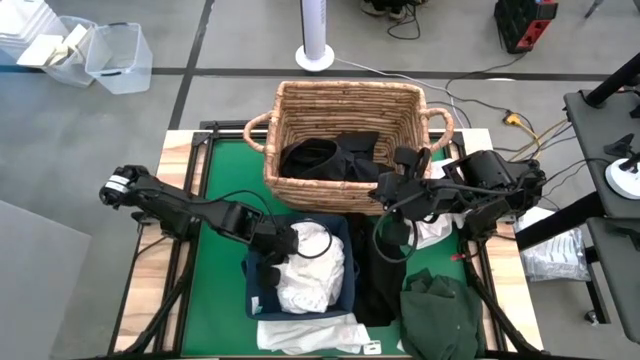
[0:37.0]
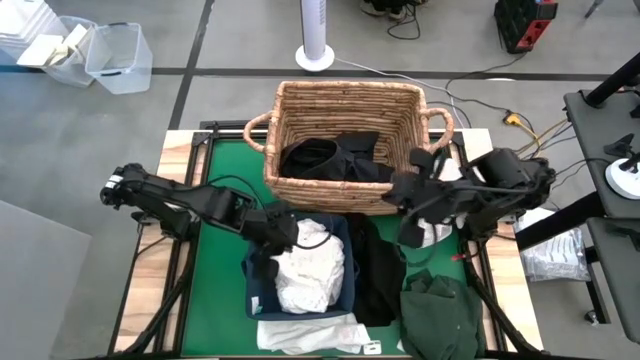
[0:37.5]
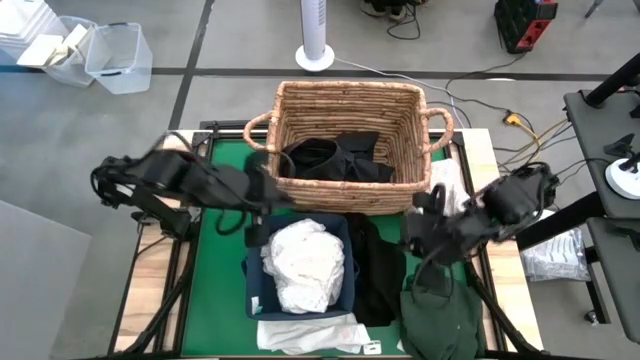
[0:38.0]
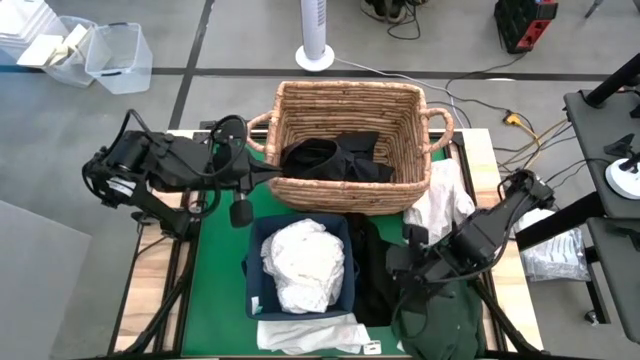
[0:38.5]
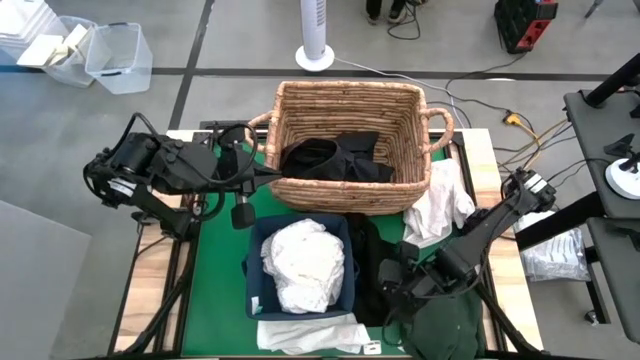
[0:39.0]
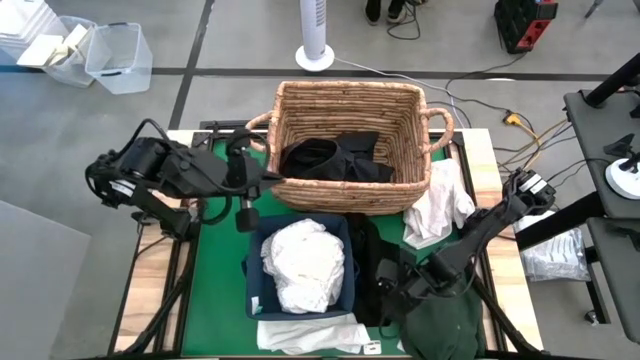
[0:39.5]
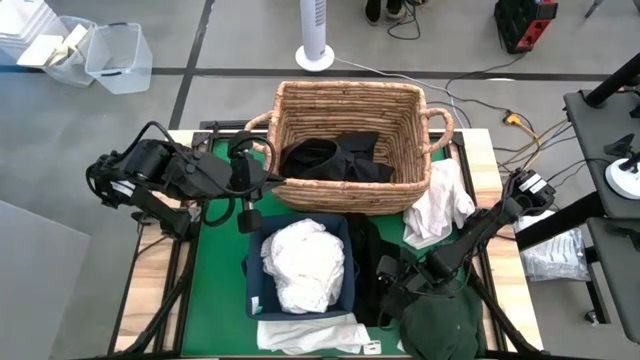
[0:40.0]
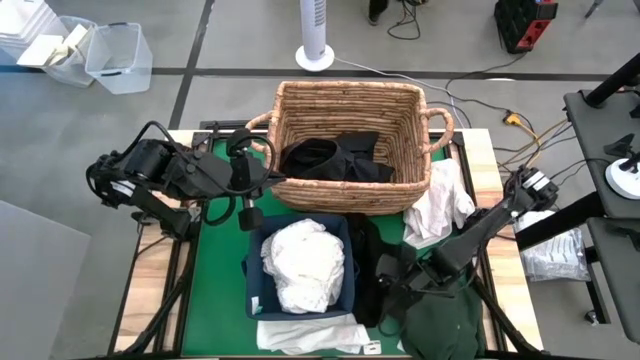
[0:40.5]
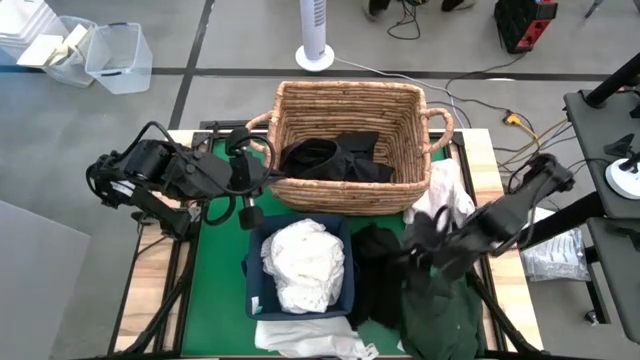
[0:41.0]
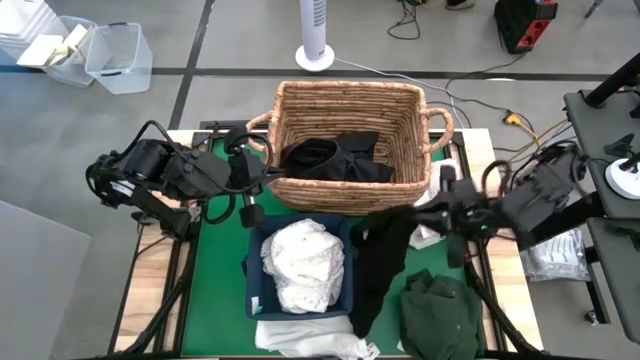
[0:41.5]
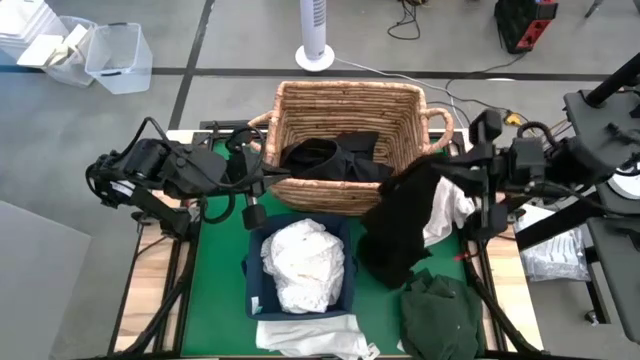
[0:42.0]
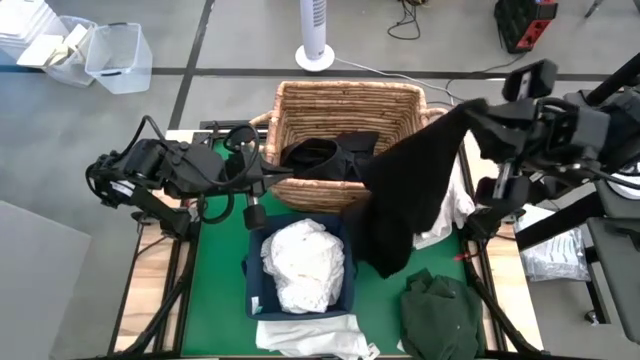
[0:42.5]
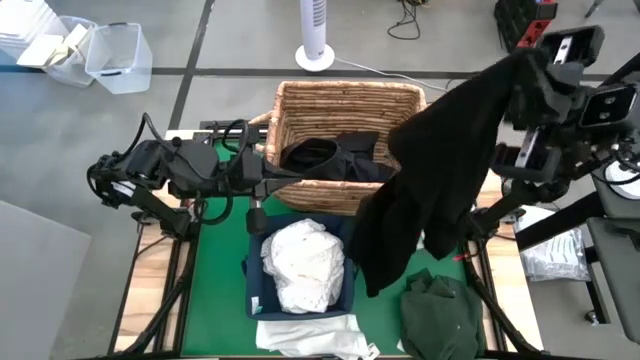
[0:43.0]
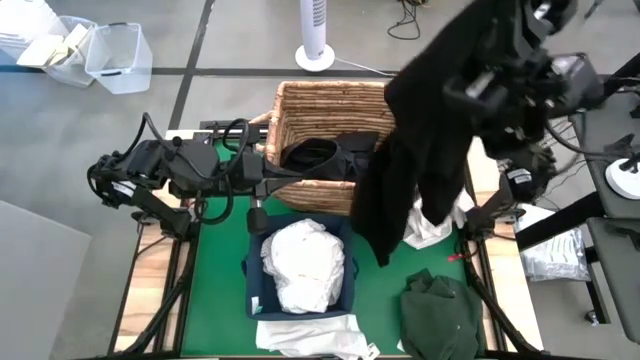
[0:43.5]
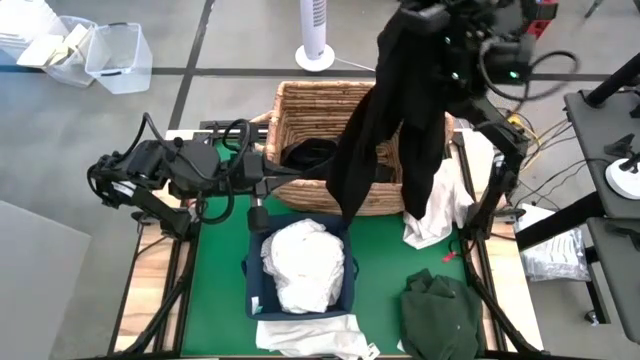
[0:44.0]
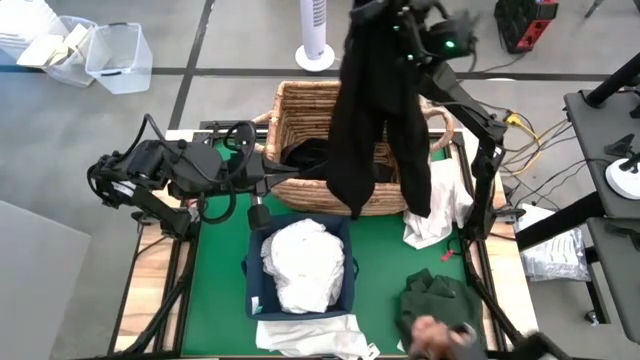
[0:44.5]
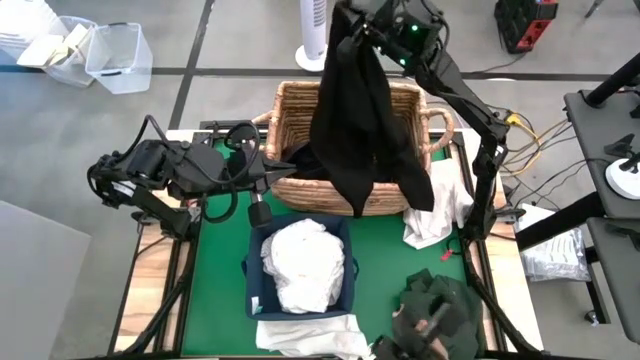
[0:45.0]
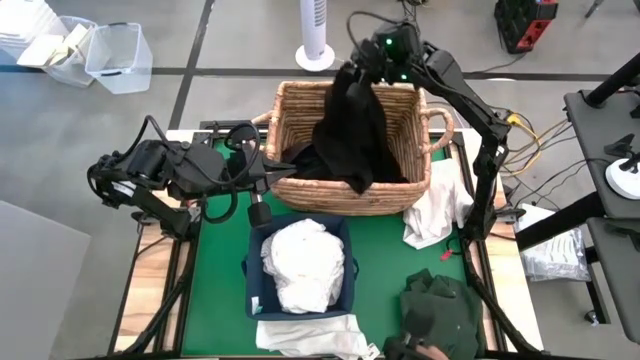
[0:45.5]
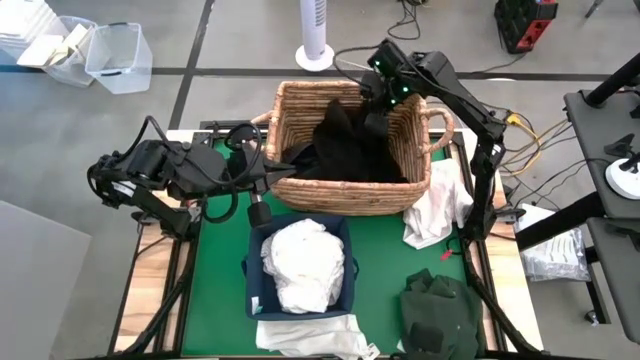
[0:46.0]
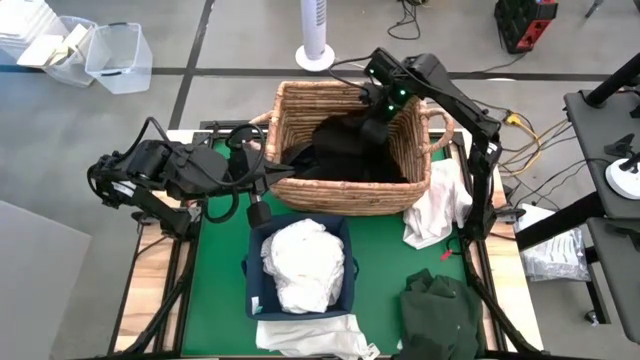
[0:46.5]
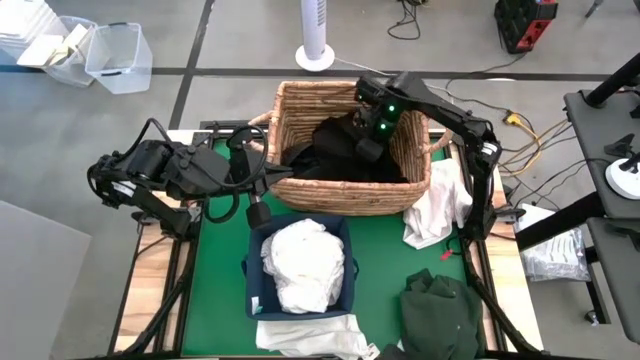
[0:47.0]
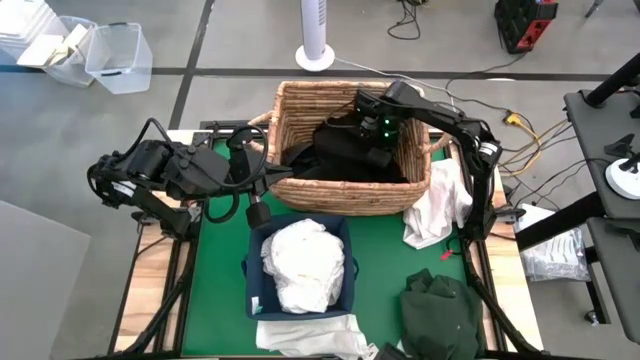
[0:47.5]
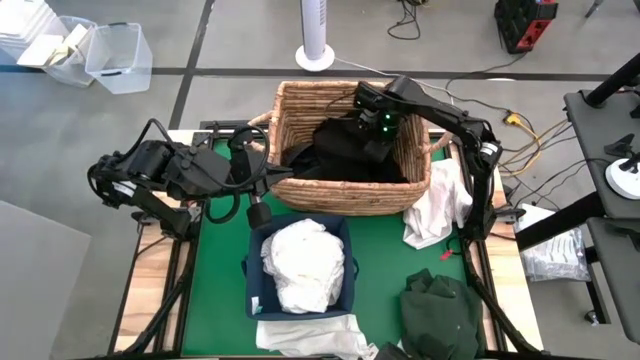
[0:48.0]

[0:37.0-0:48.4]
Put the black pants into the brown laundry basket

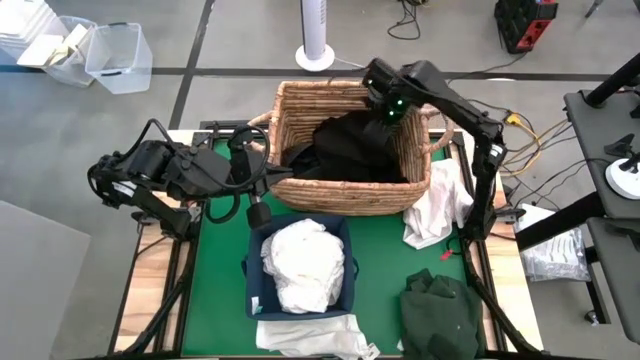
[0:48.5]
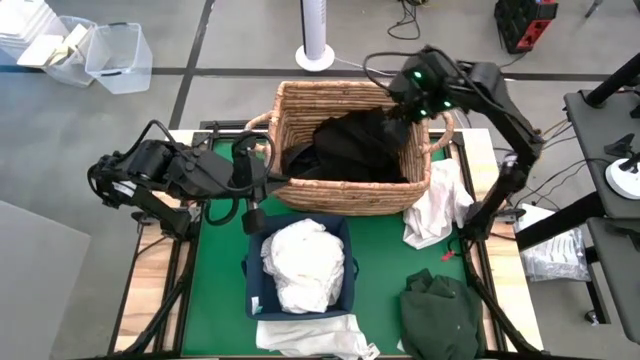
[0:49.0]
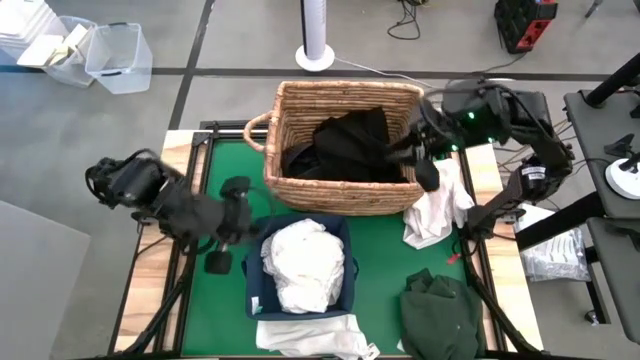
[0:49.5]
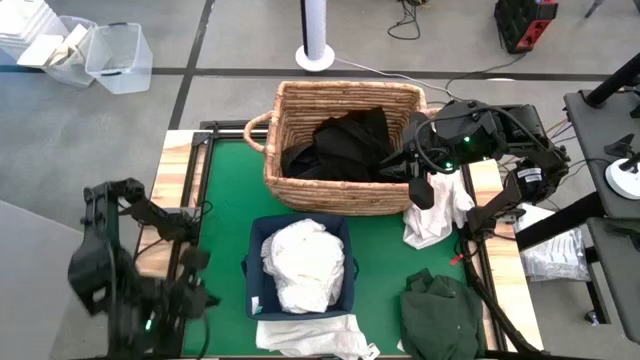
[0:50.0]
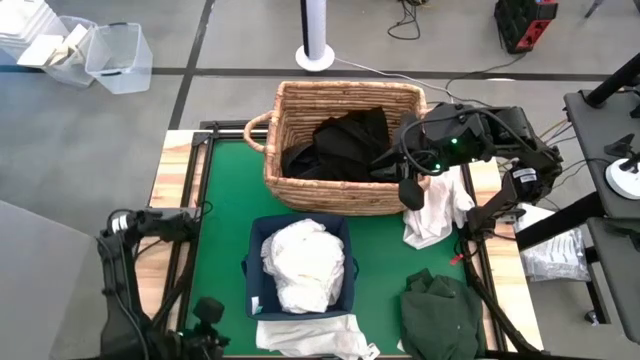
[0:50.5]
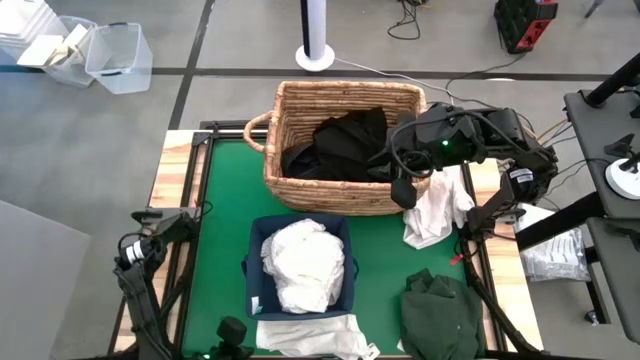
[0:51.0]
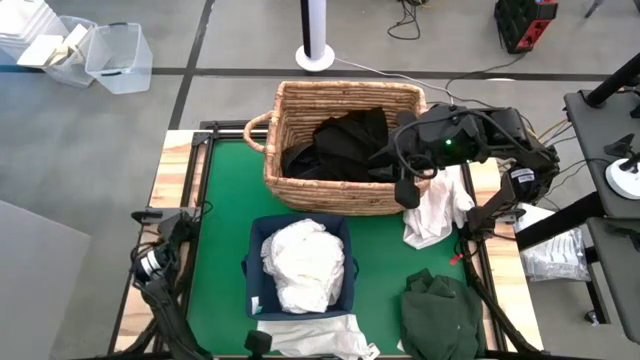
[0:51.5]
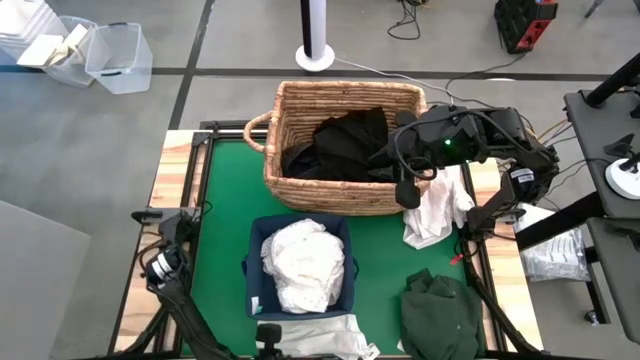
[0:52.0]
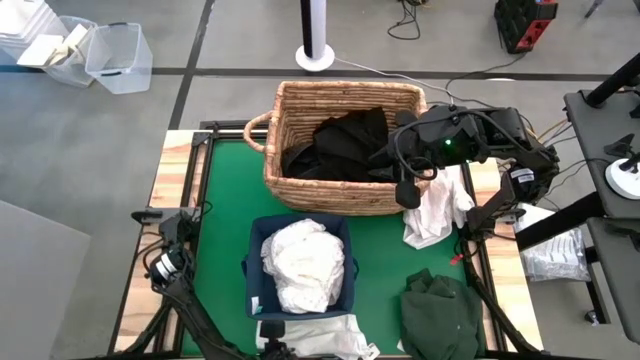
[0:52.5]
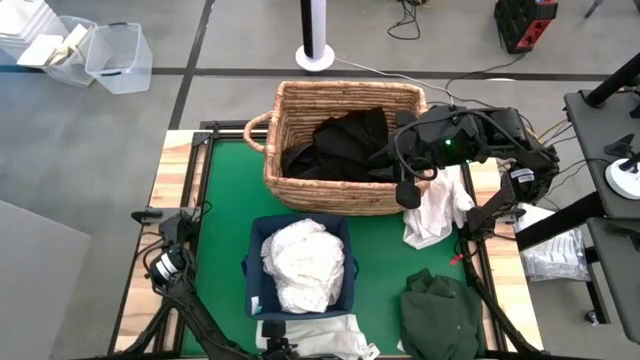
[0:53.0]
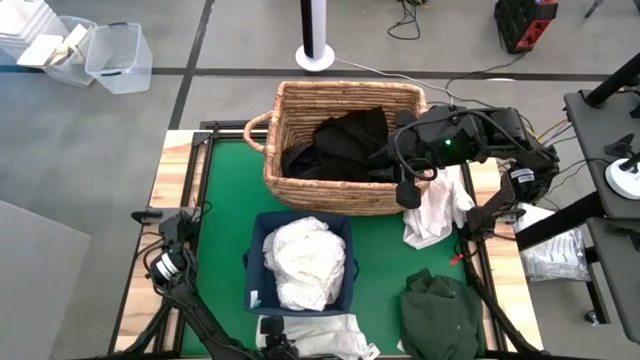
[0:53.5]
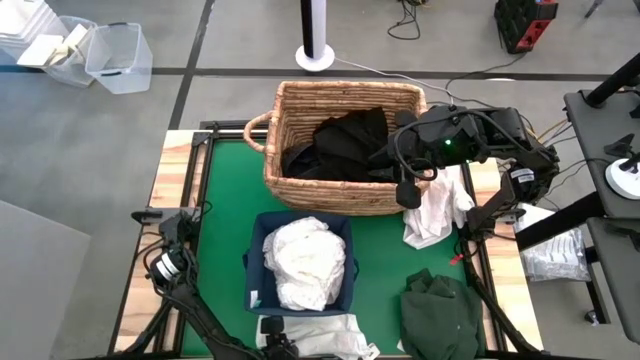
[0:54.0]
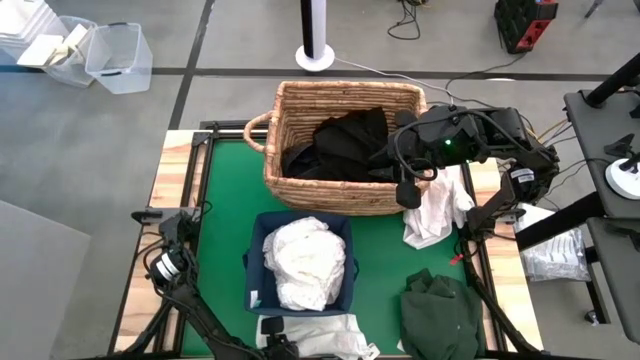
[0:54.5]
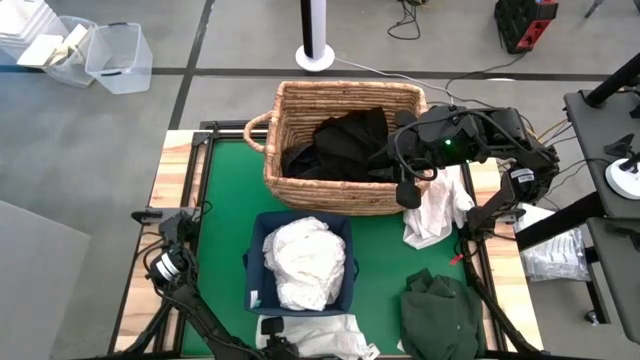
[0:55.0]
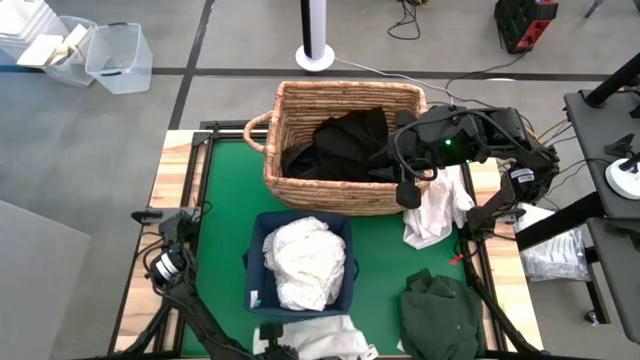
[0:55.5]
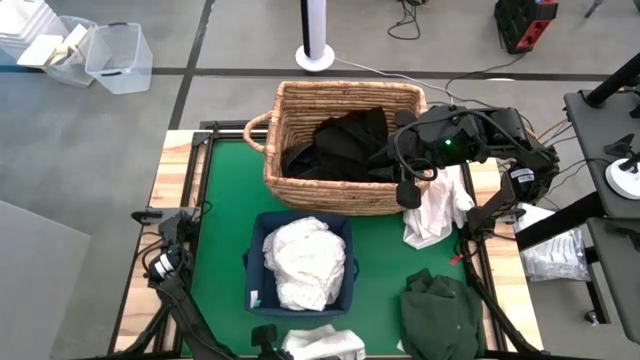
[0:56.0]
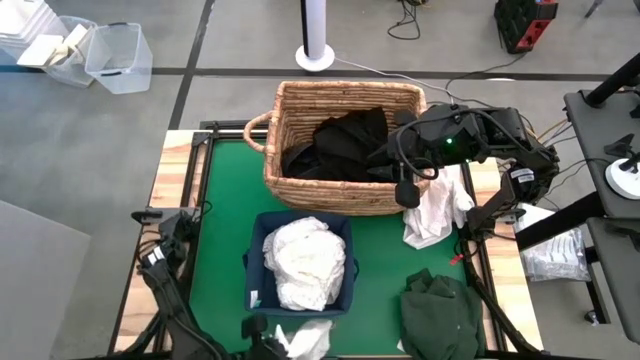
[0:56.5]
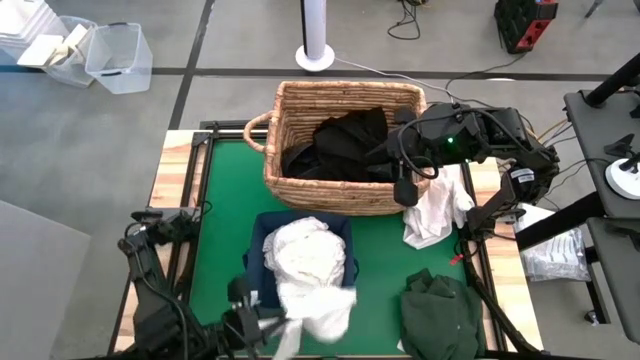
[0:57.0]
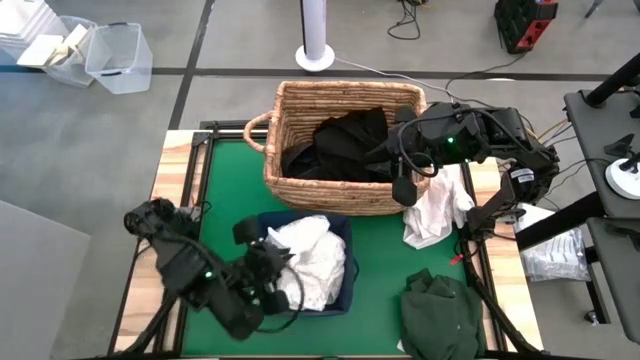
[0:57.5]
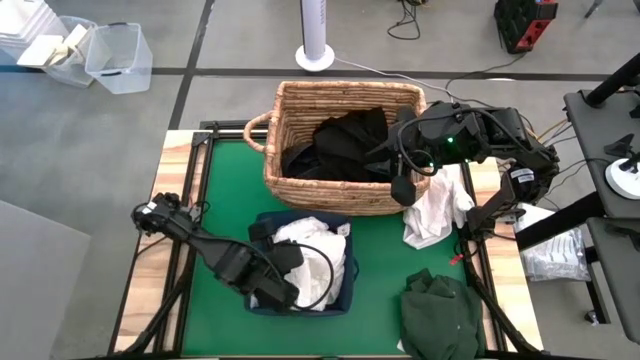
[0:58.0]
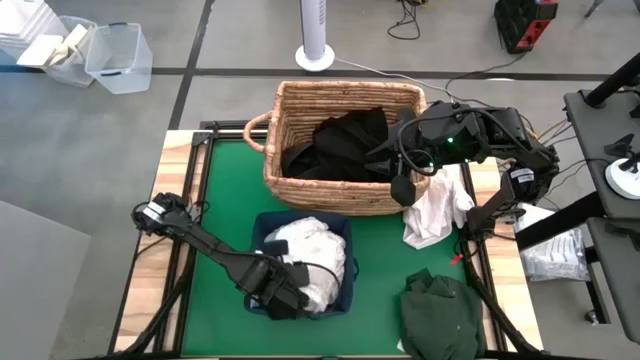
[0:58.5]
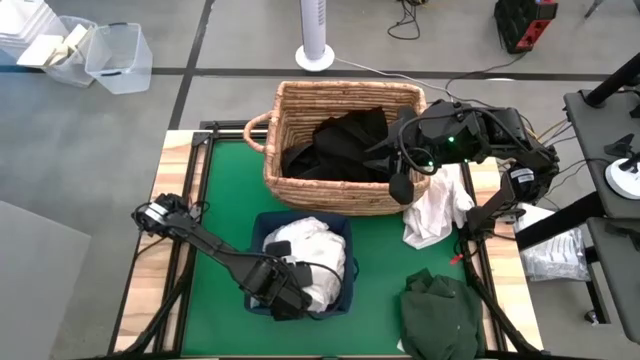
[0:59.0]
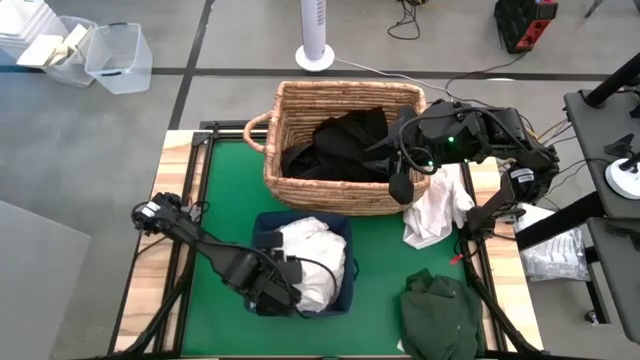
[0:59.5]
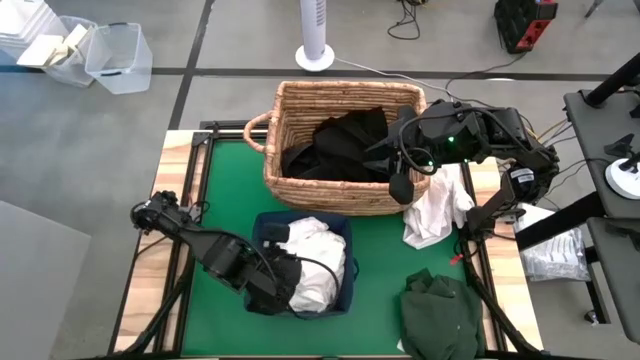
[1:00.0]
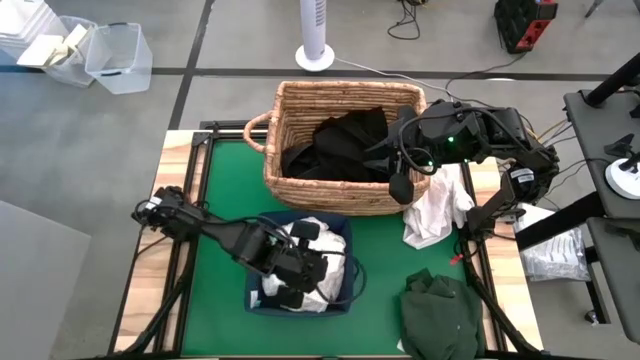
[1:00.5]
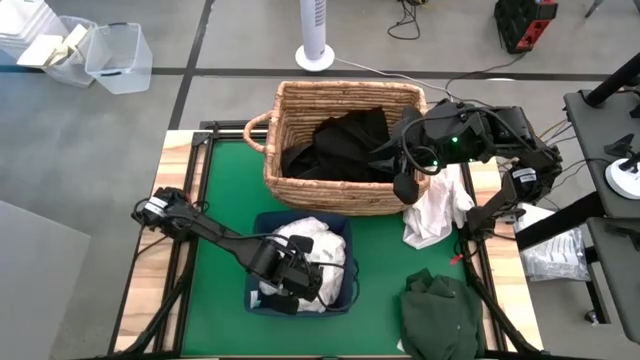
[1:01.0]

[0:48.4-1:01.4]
Put the bottom white shorts into the blue laundry organizer
